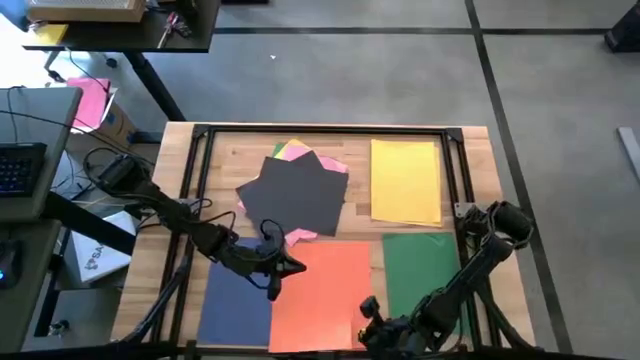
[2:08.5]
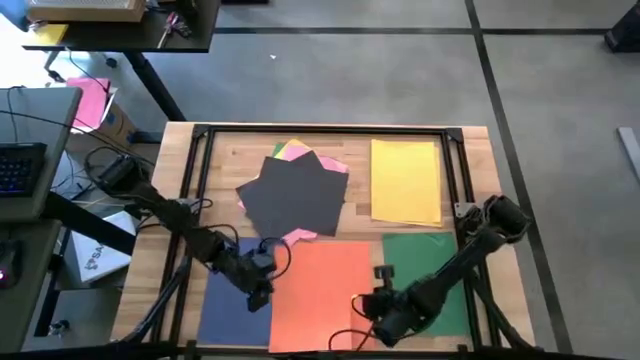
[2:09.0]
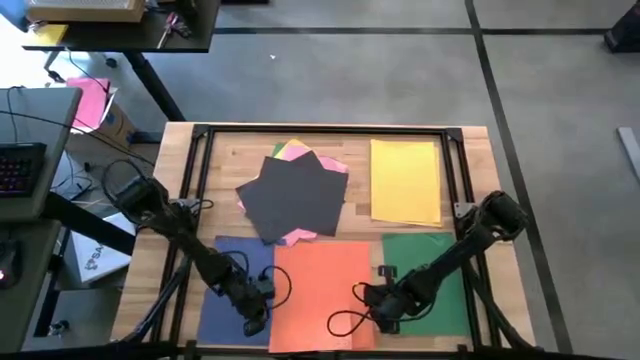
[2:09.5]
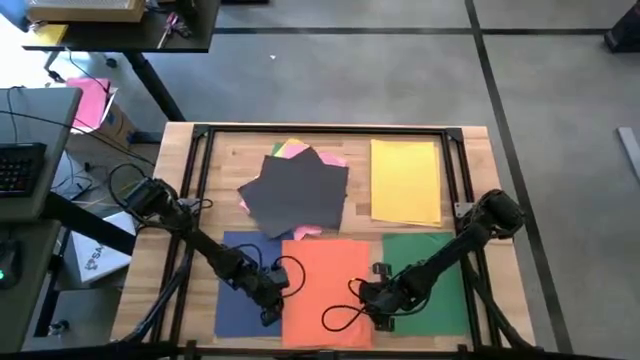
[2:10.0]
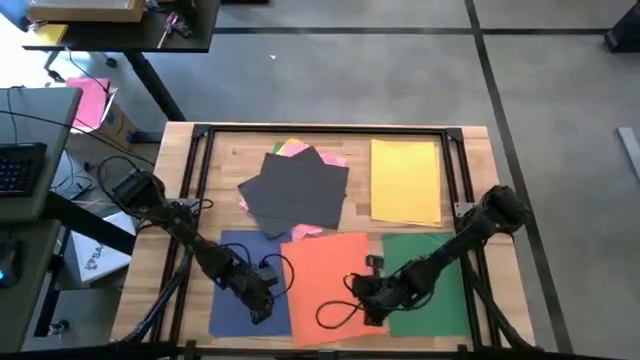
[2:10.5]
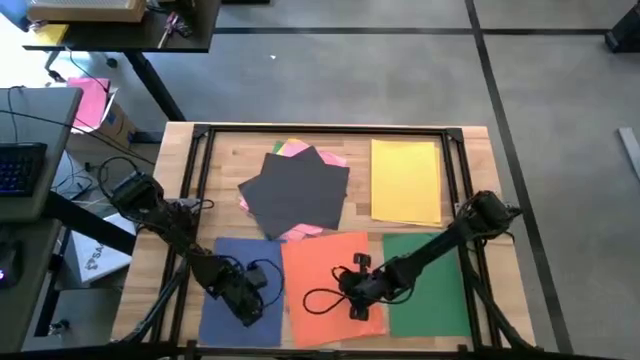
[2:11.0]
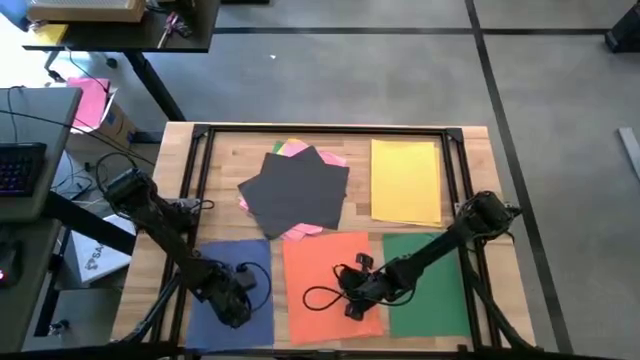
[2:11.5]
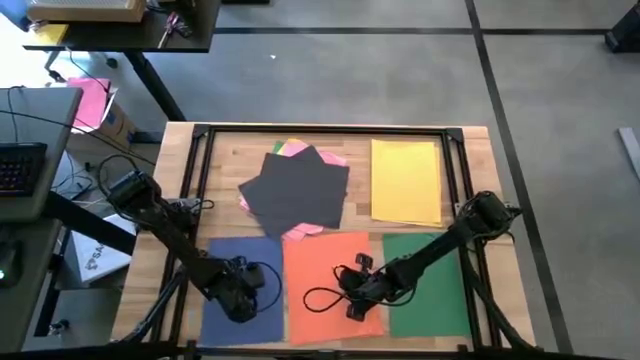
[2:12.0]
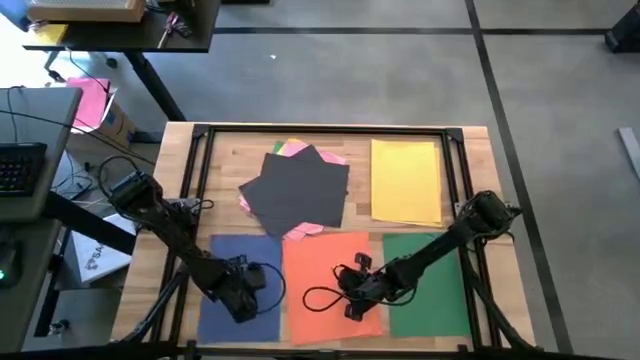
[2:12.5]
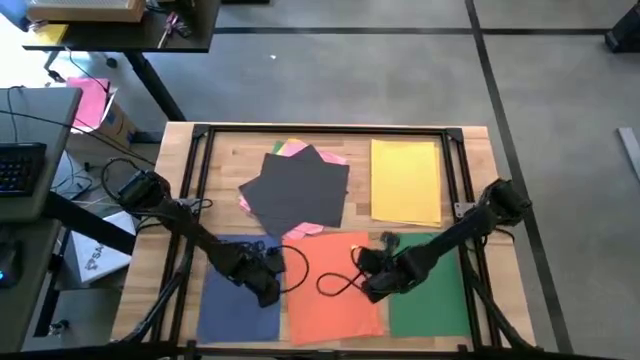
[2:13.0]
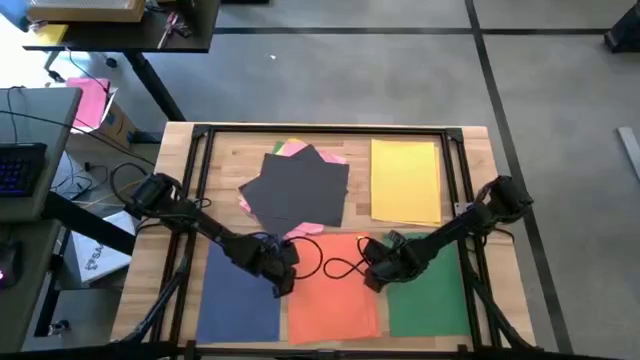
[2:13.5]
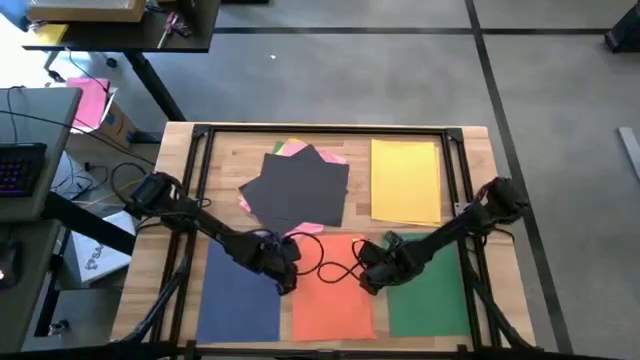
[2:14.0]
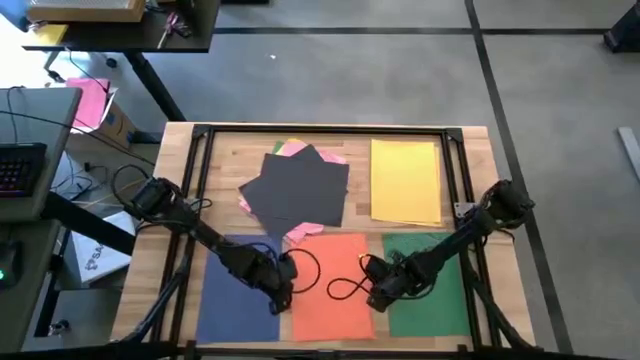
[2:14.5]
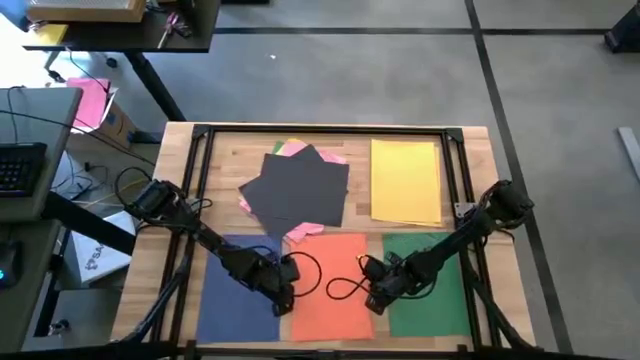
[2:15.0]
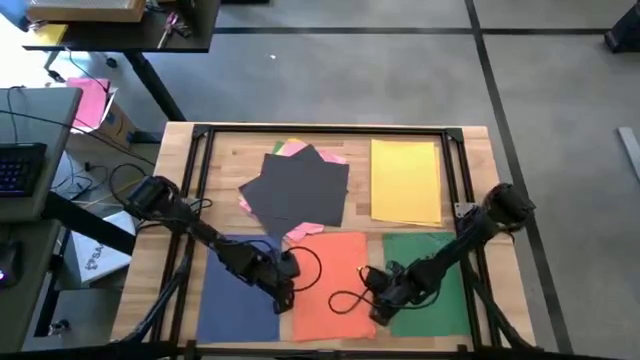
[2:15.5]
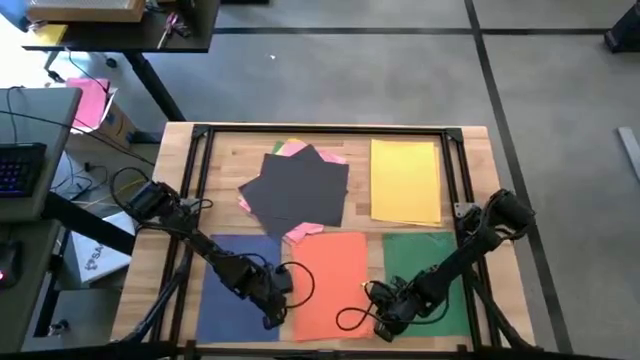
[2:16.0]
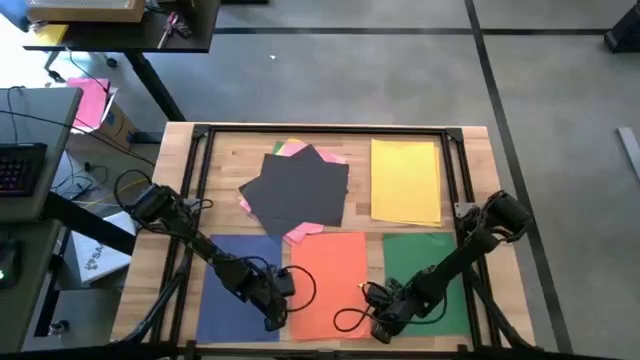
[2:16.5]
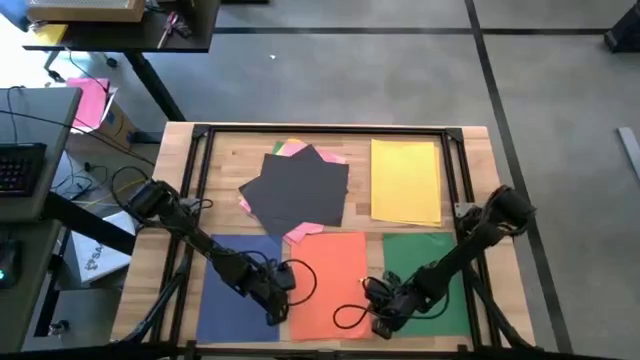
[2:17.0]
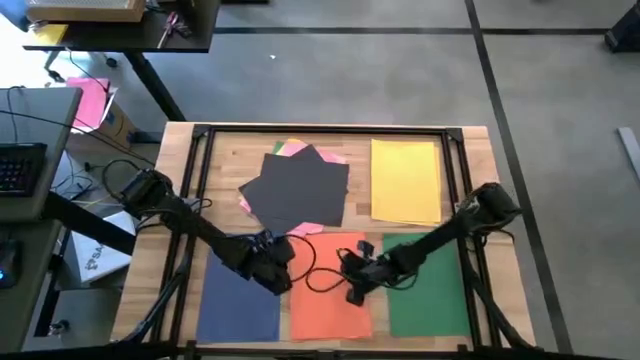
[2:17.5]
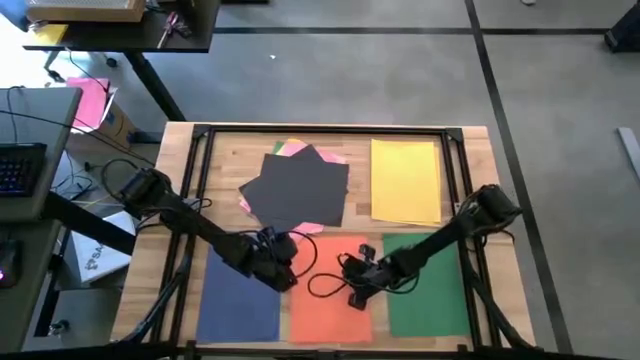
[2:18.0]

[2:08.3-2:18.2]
Task: Organize paper
Adjust the bottom center orange paper

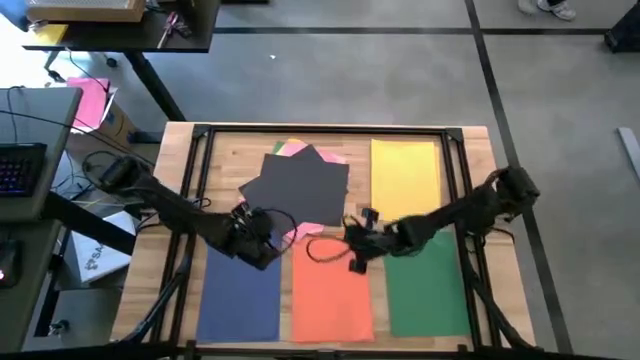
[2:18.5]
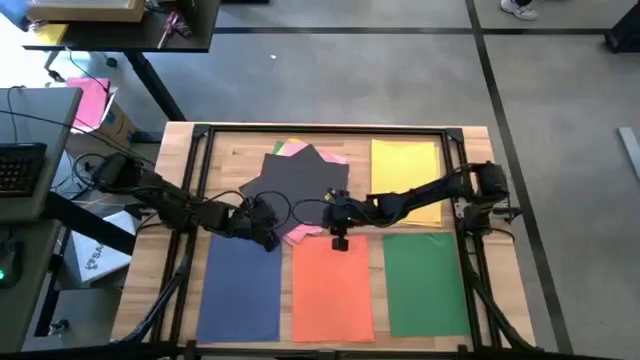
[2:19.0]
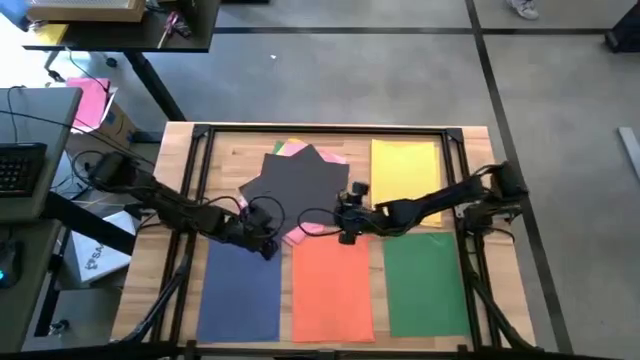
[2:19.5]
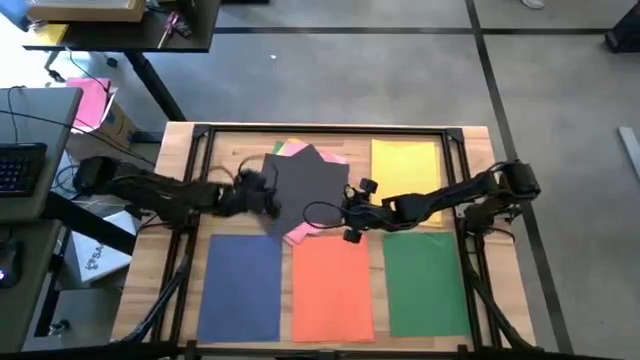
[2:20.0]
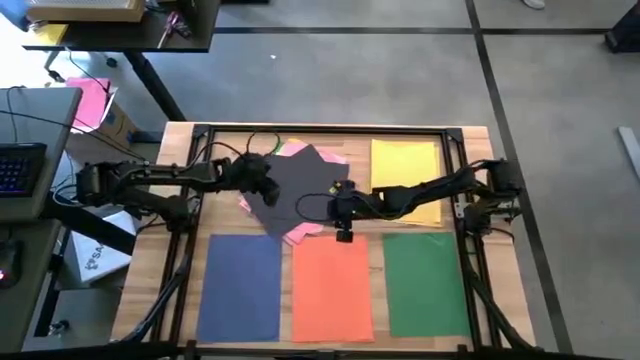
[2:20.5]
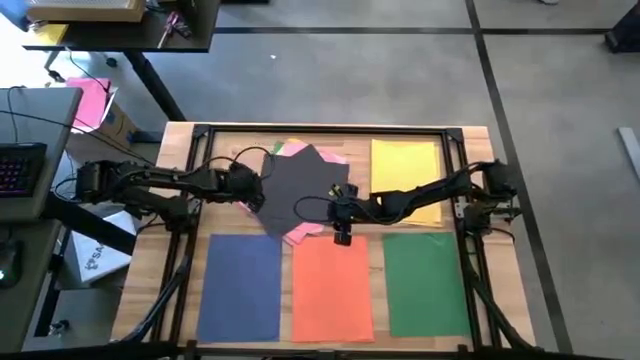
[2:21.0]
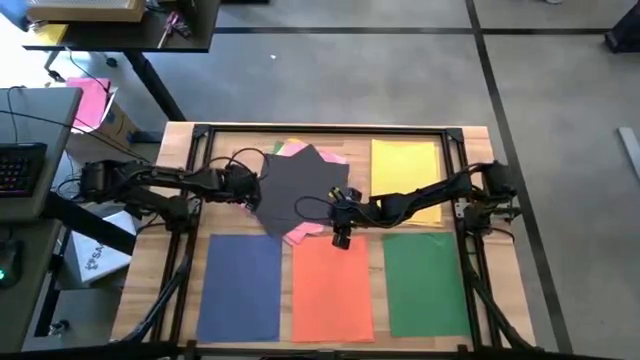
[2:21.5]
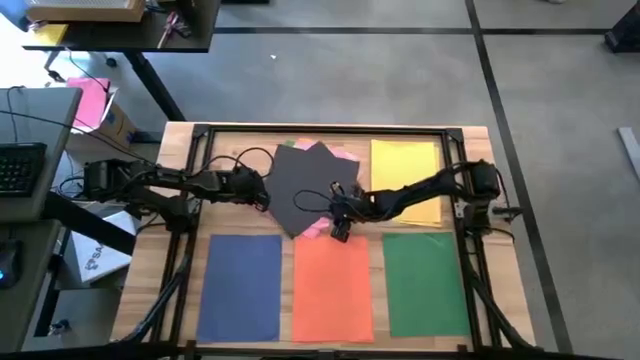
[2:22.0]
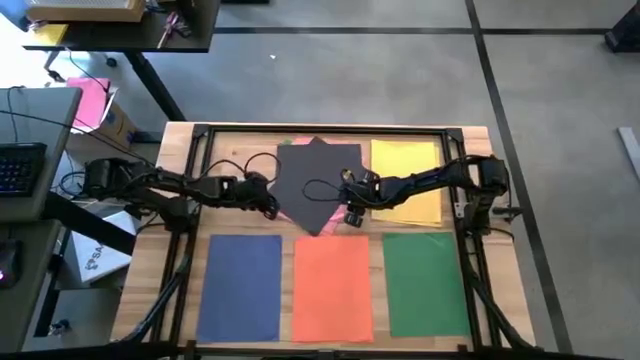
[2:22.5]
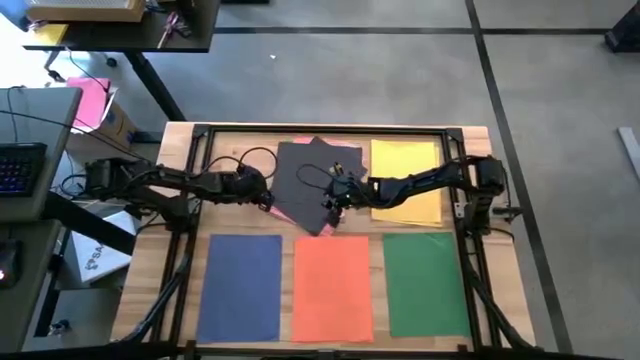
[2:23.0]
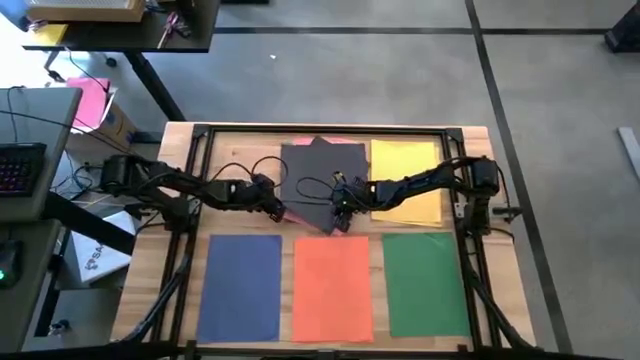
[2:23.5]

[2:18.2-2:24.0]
Adjust the colored papers

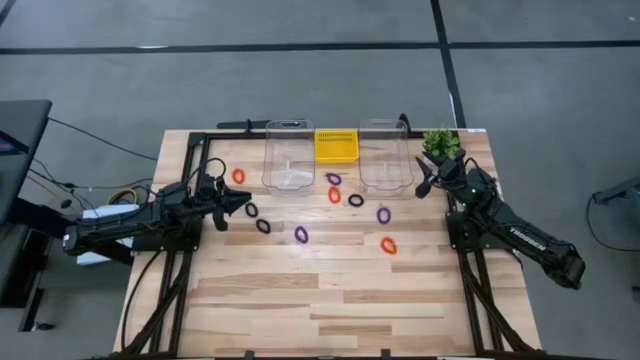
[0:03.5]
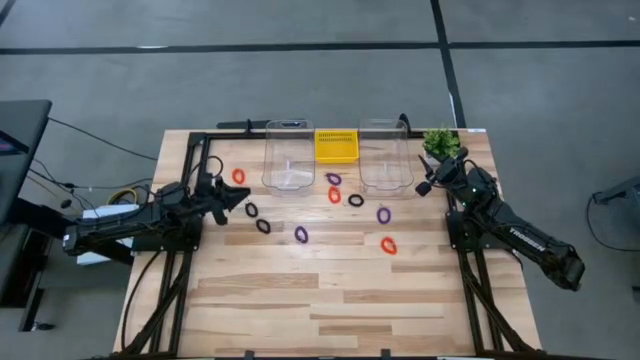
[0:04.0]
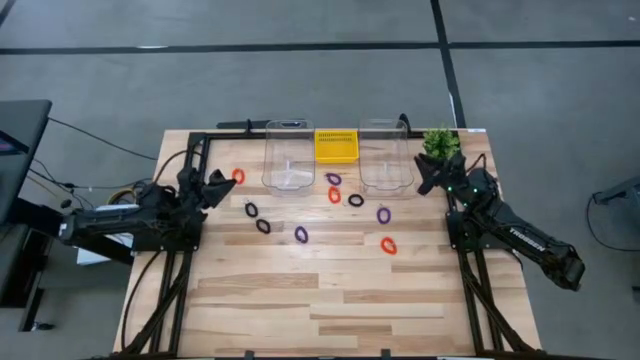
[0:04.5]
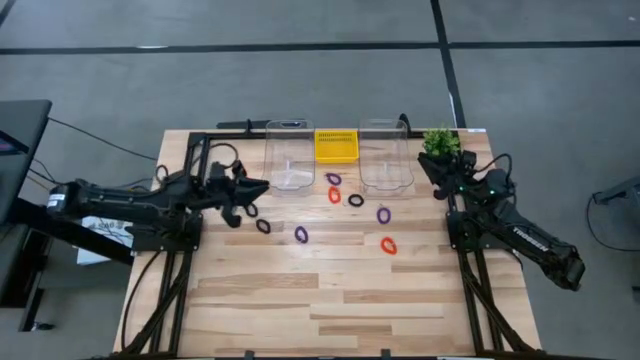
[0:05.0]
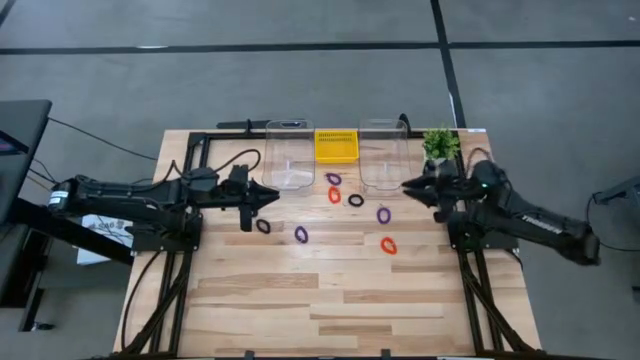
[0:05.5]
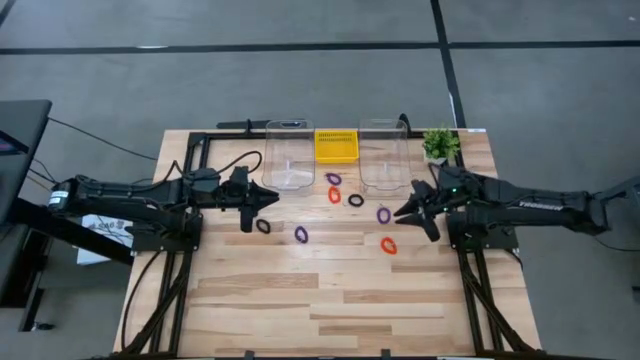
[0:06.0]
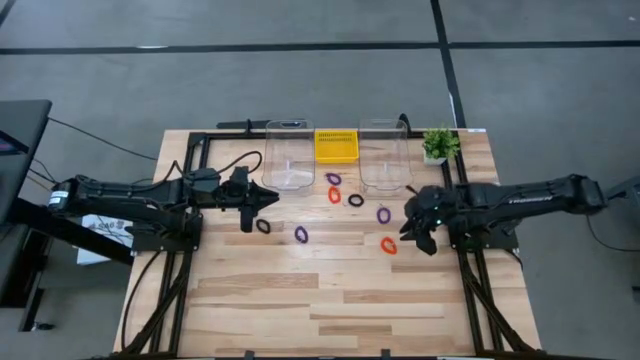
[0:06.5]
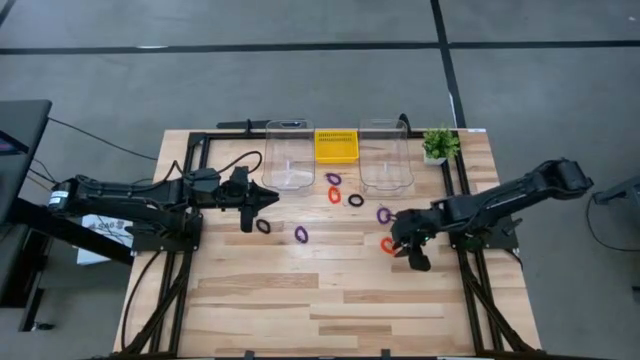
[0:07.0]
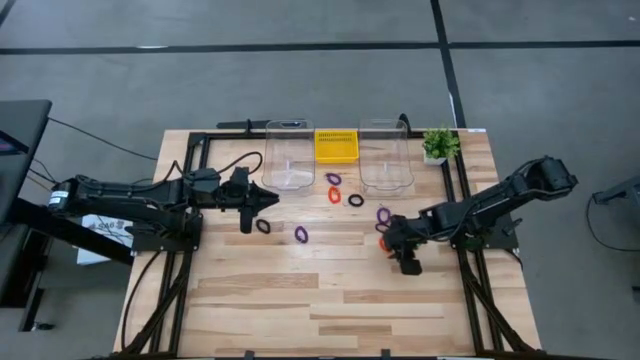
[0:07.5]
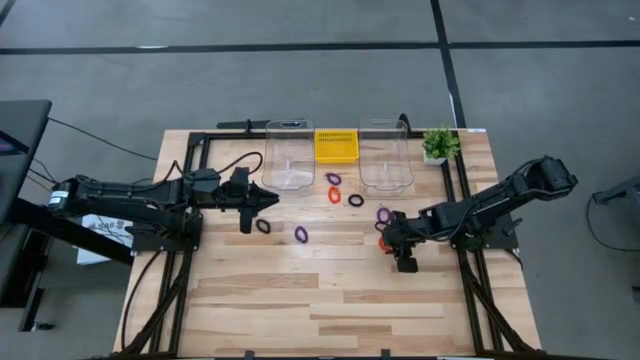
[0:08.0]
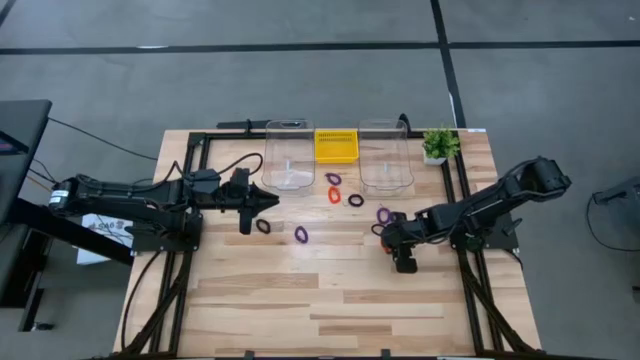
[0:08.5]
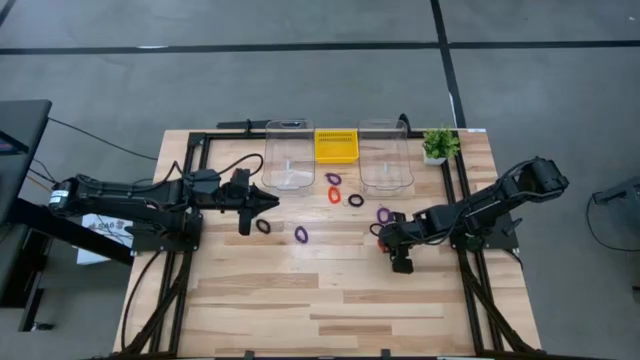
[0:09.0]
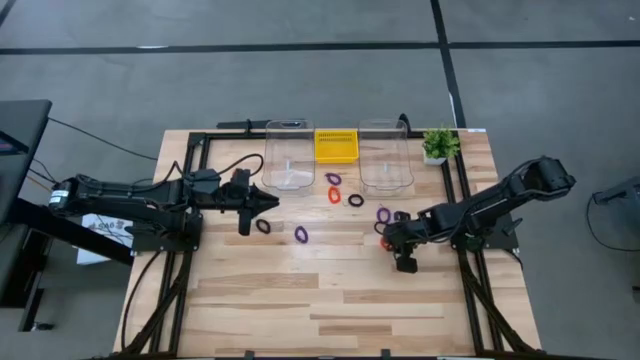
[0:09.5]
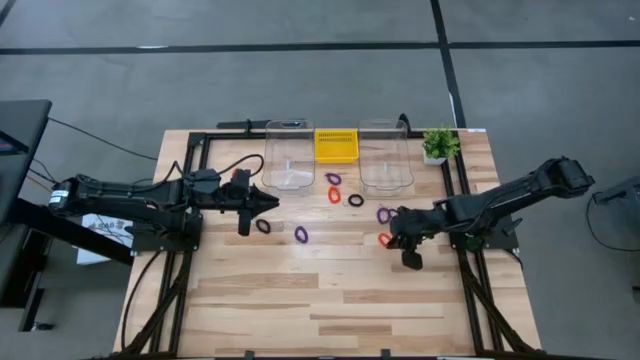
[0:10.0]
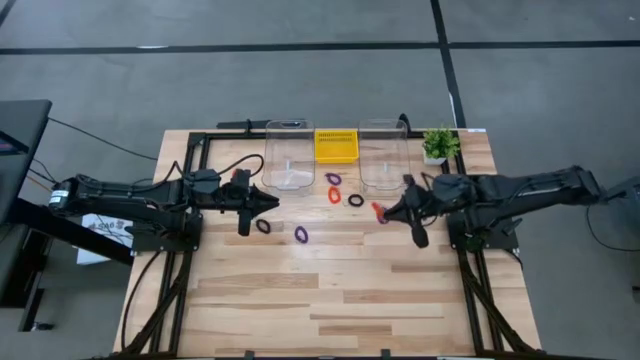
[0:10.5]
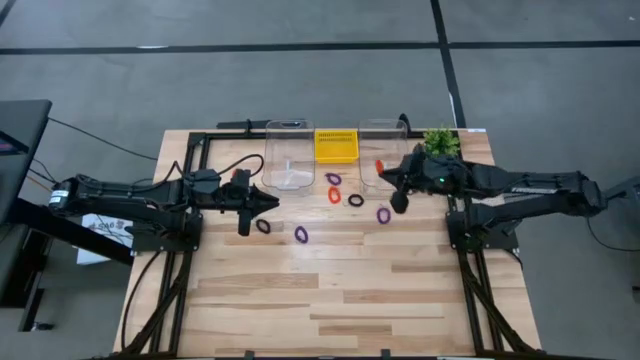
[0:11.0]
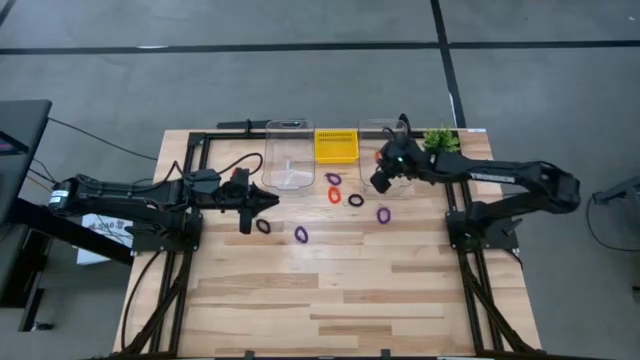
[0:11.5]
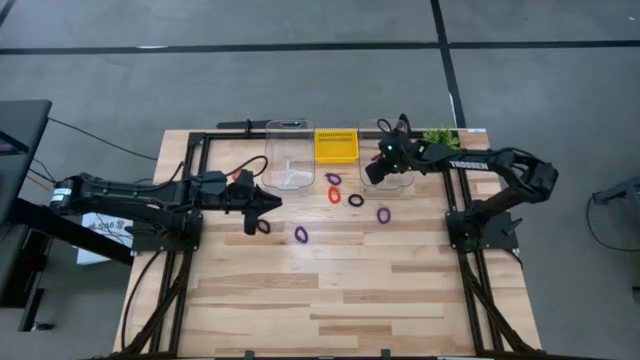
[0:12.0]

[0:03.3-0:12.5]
Task: Sort spring keychains
Put the bottom right orange spring keychain into the right transparent bin
